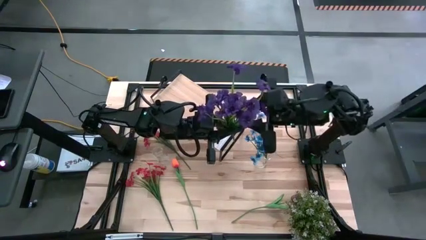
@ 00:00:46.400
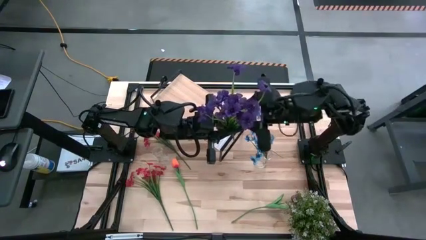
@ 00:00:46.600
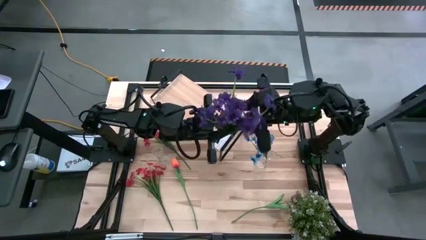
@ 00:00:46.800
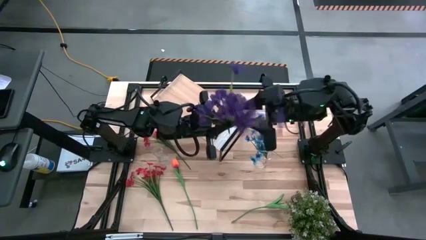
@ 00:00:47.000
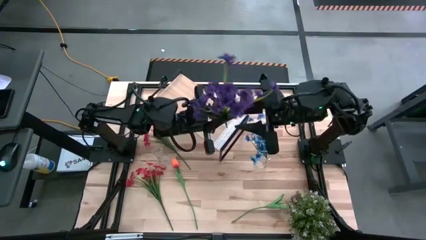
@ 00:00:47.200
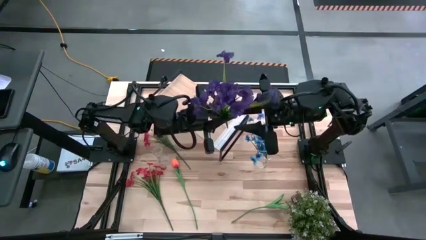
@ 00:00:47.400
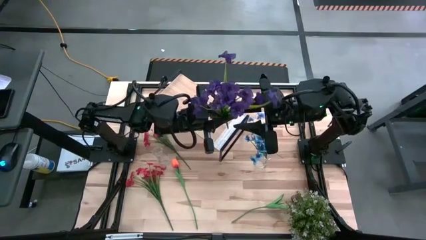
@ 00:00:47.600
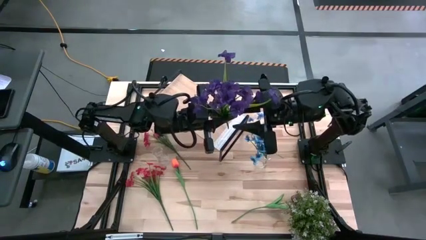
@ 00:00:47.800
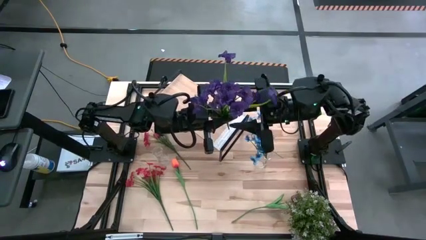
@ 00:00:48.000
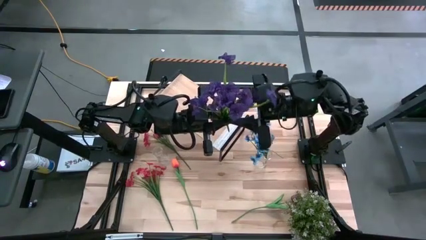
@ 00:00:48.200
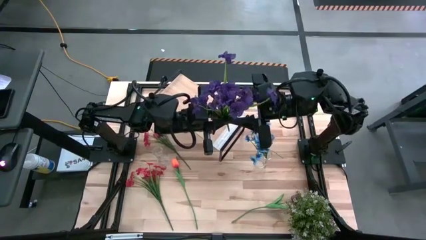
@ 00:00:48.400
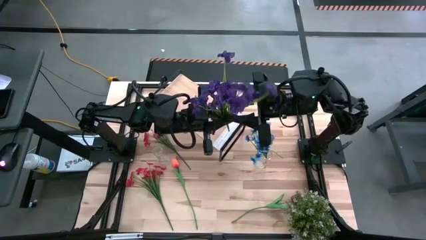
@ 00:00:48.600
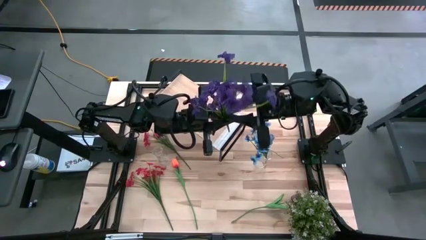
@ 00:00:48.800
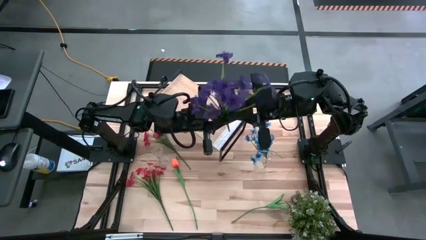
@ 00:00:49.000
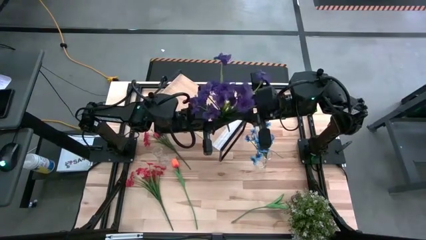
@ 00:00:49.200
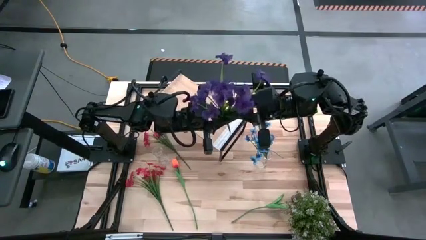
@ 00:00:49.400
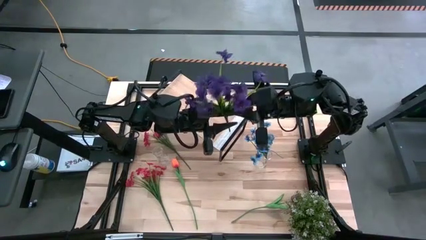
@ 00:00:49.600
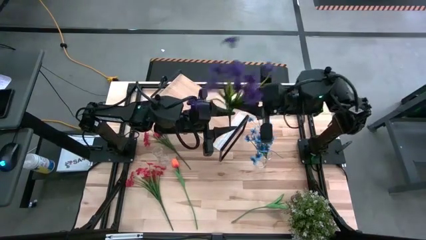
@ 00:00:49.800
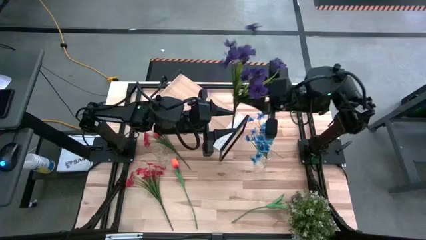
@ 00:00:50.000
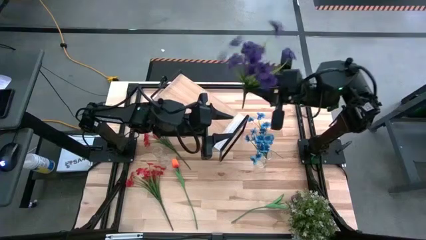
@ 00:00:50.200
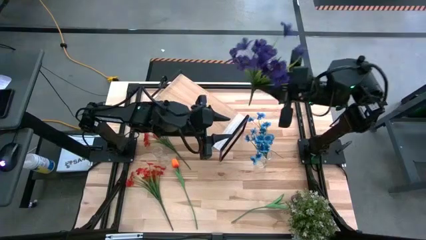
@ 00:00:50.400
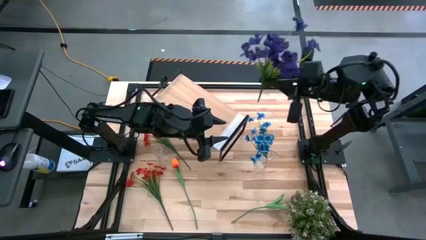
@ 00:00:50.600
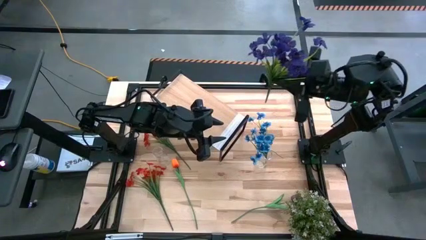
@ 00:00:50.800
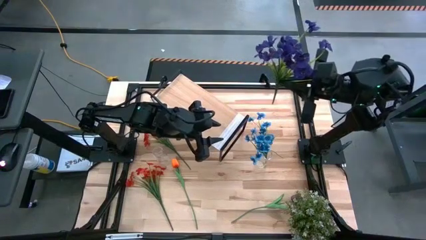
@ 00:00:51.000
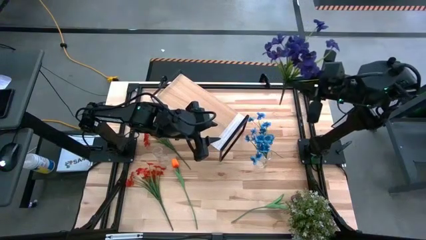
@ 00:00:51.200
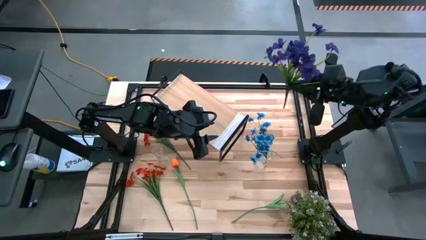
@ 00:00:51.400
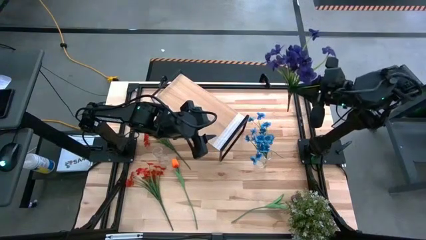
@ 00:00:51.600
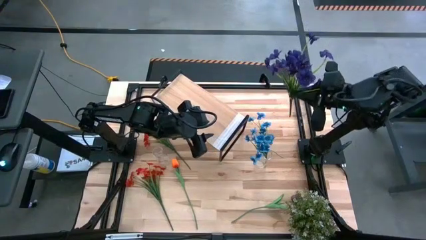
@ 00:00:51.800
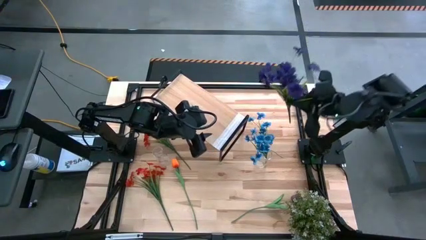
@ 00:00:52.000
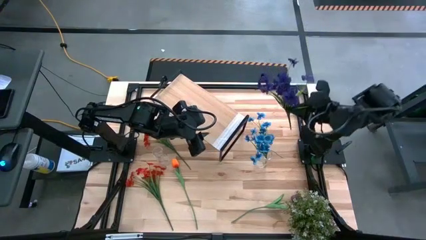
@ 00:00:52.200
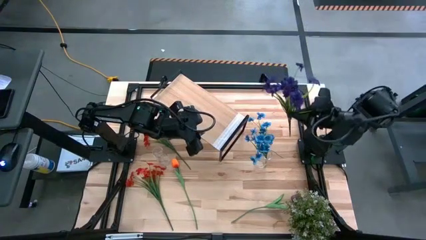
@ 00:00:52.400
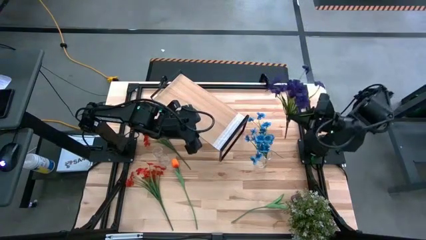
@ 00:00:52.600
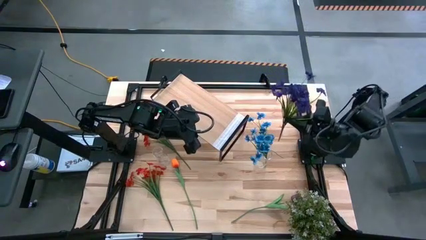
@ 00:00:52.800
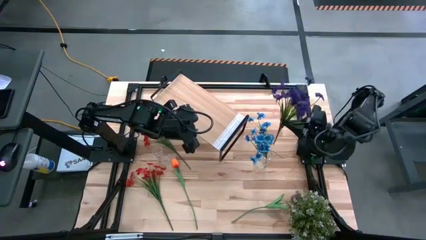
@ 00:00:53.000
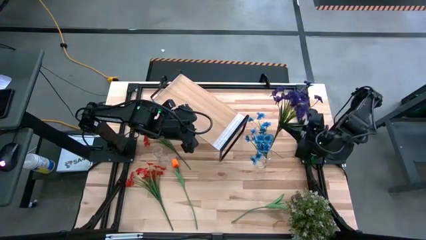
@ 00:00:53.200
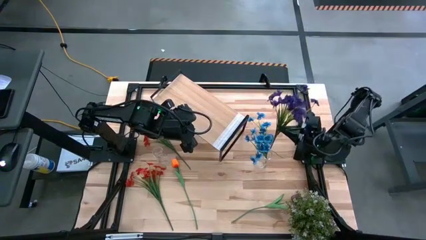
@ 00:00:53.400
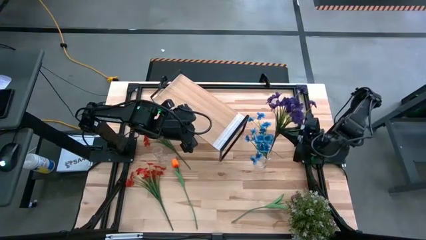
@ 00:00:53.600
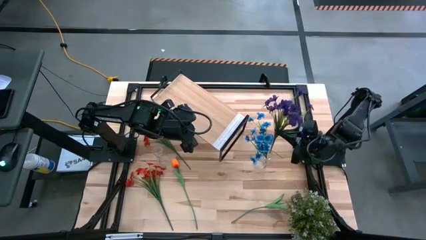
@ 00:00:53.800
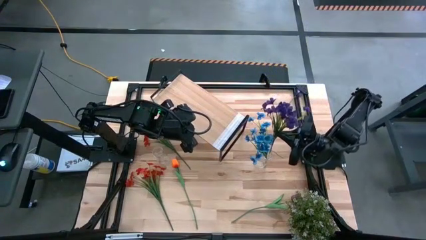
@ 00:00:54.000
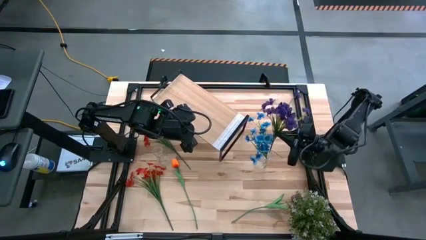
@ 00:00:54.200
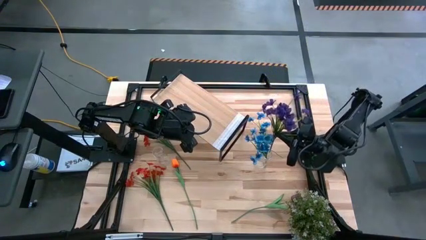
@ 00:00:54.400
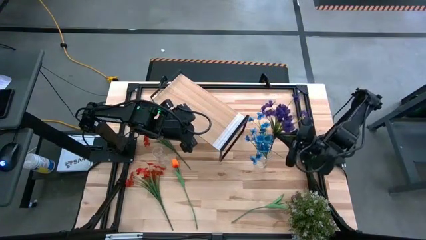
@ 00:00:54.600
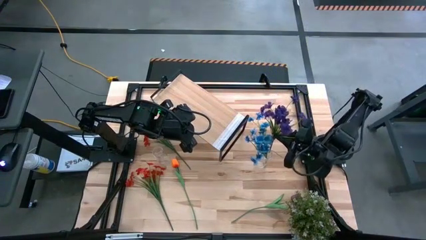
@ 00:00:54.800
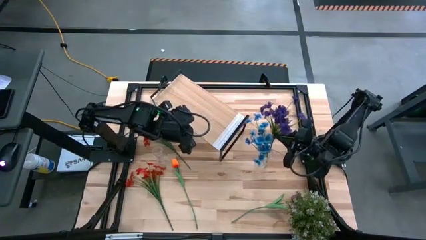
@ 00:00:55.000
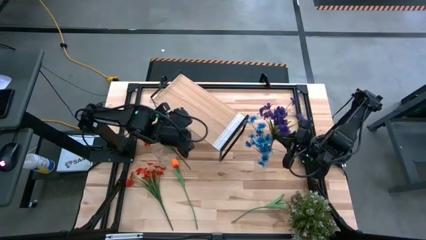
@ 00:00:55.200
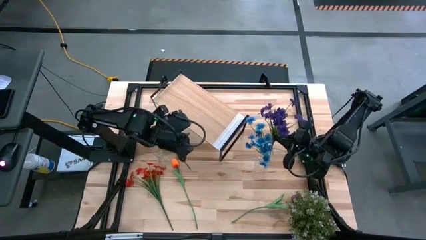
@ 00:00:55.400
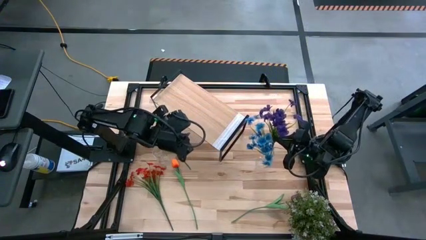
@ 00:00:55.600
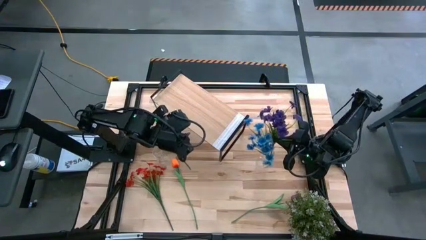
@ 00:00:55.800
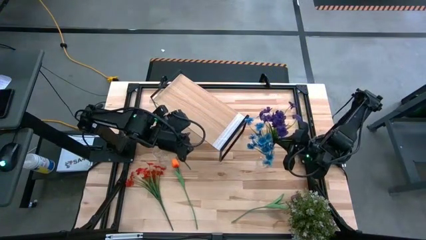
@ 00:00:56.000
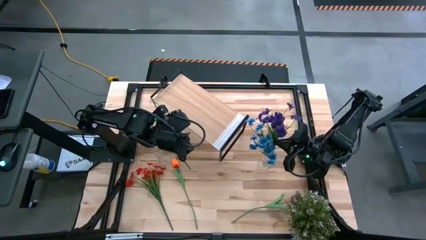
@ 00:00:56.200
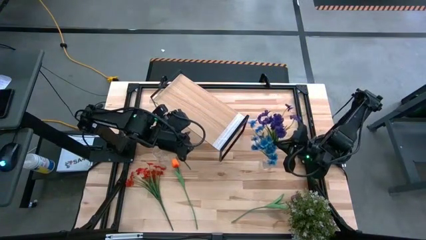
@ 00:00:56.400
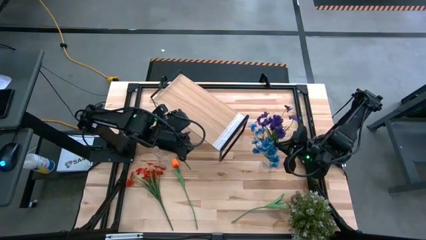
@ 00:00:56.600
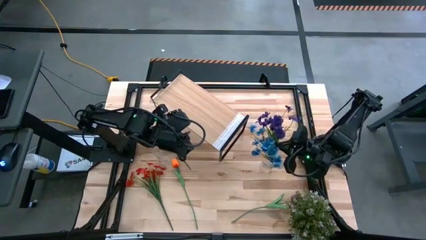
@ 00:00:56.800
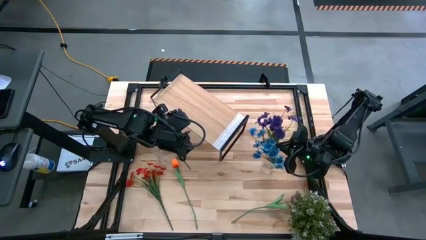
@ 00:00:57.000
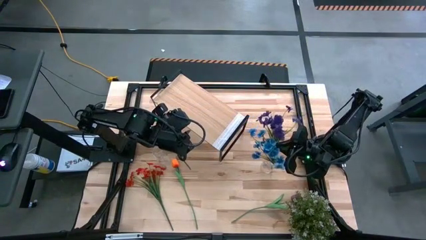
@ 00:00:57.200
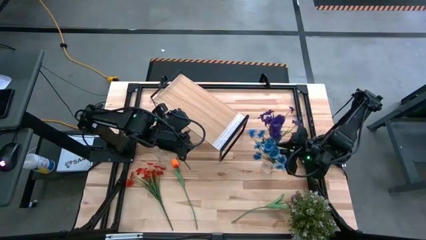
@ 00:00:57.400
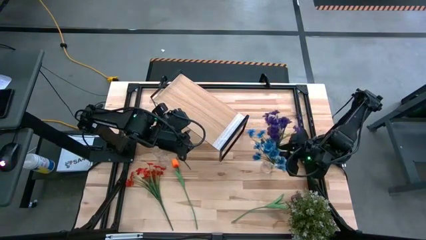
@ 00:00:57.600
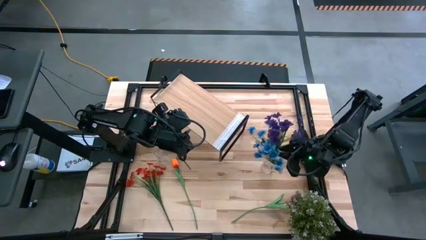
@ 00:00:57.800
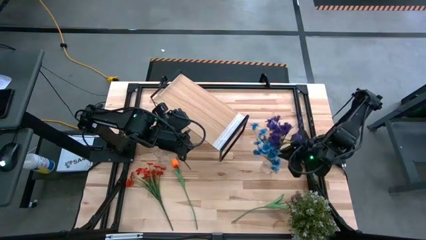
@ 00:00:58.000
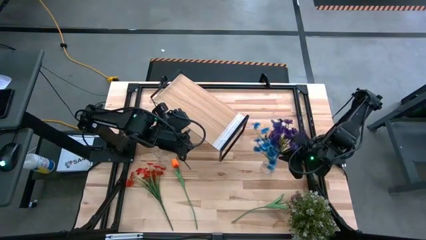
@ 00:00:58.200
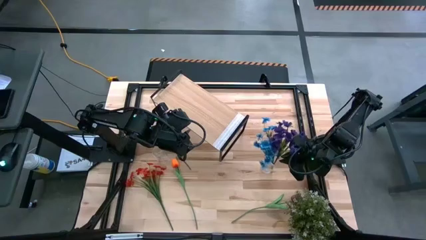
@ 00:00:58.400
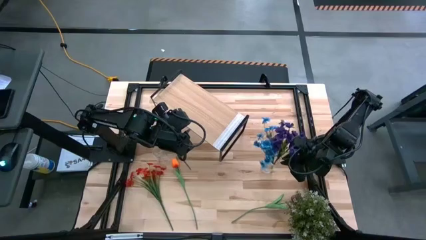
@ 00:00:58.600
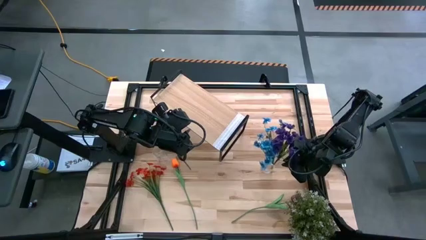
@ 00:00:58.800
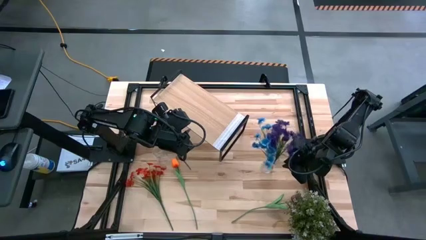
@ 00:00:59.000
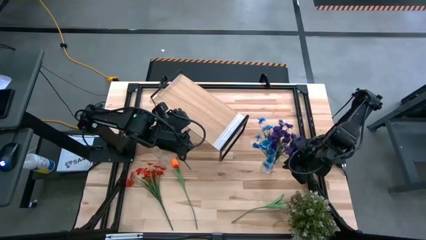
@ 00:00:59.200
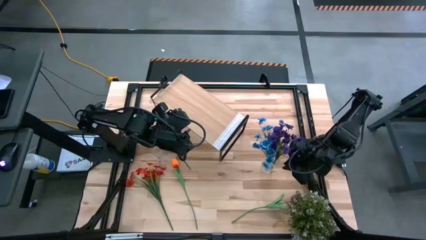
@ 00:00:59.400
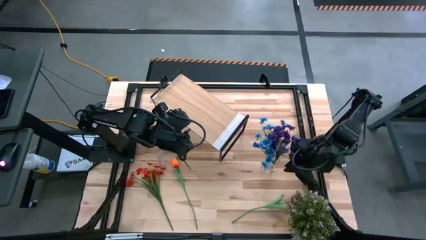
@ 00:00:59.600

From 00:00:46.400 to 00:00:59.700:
Task: Pick and place flowers into a vace then onto a shelf
Put the purple flower into the right transparent vase

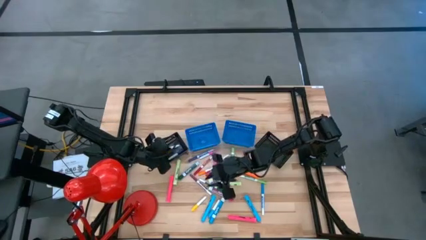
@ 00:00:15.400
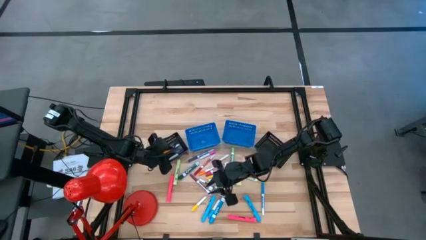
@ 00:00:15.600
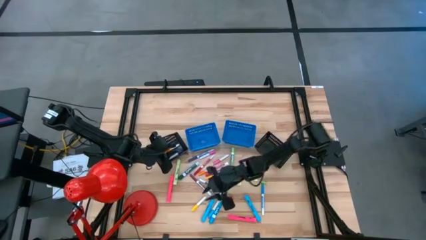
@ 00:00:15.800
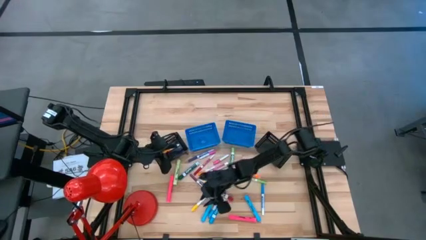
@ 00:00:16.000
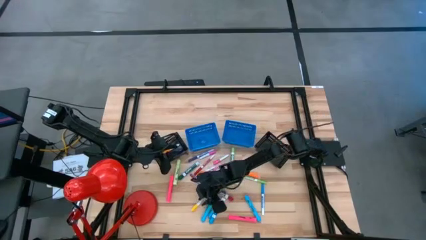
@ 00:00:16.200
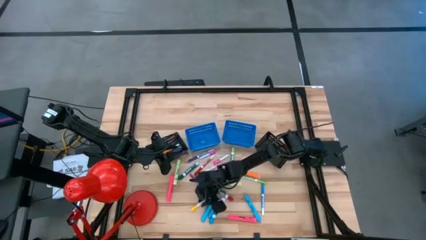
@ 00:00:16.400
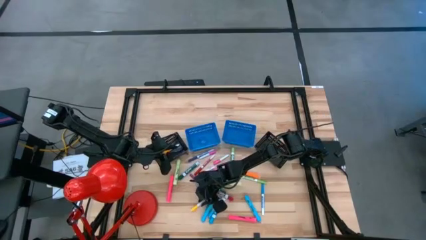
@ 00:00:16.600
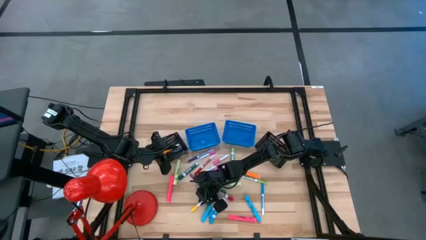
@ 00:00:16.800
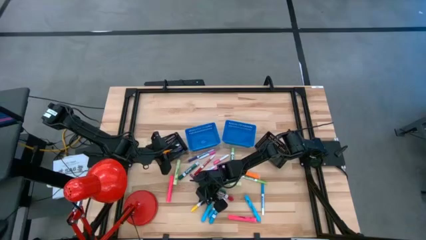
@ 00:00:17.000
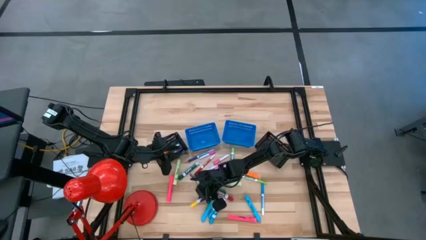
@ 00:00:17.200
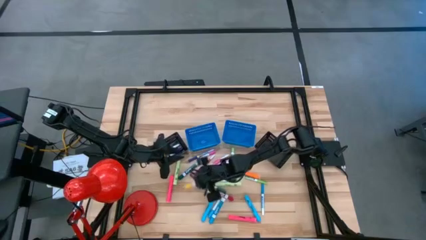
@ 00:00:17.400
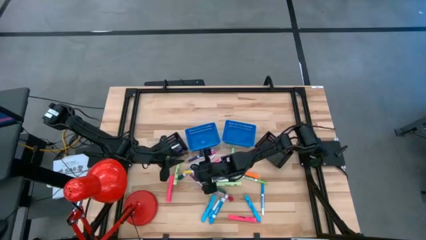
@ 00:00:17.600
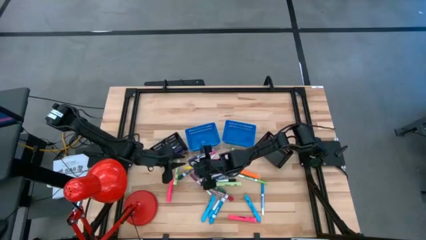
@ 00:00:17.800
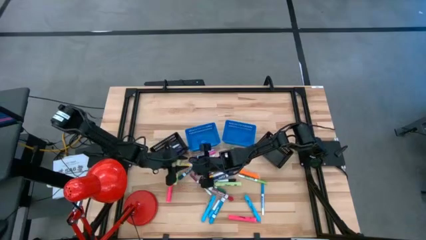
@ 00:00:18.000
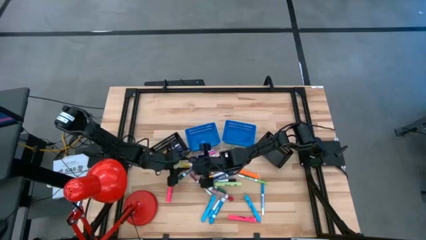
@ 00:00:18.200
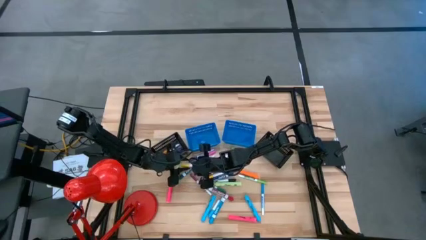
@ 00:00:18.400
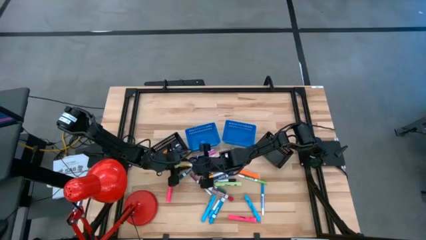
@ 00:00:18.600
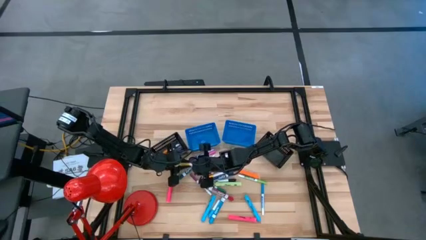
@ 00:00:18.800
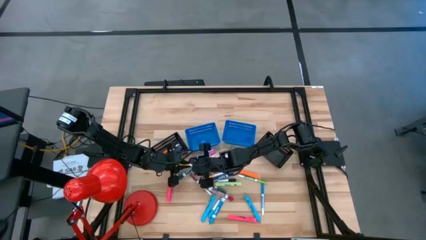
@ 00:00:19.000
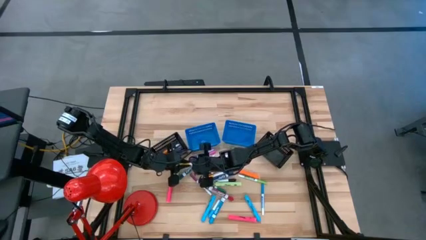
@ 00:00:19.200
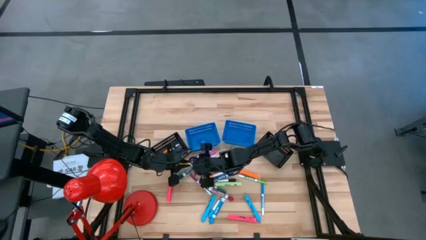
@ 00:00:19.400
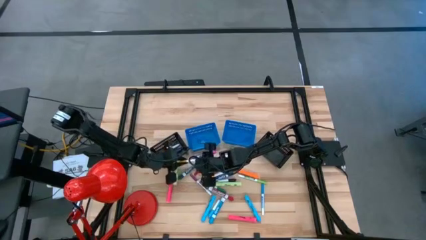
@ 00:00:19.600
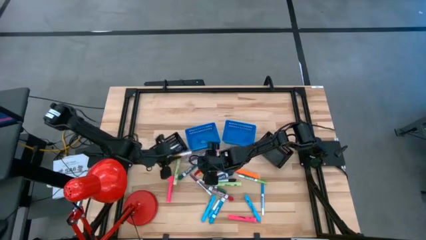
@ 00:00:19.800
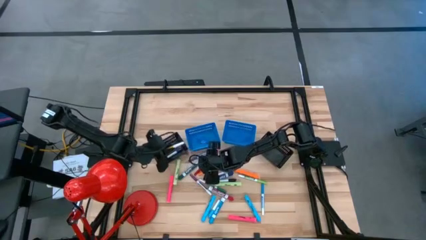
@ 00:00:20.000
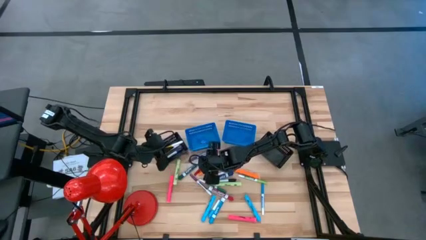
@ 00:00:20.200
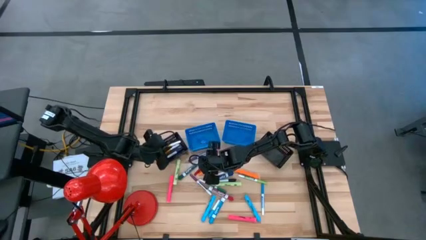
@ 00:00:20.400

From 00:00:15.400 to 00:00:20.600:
Task: Pick & Place Markers
Put the yellow water marker into the left black bin
